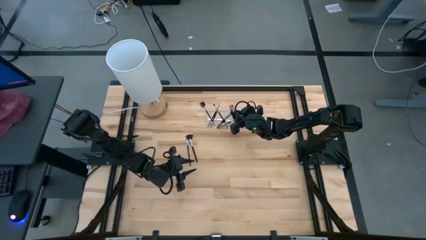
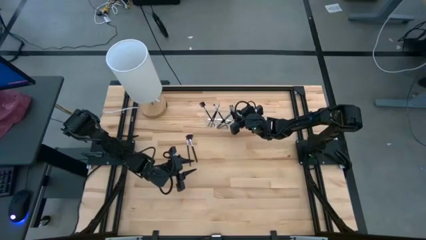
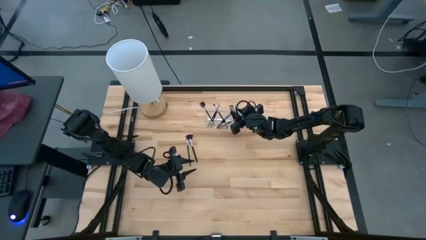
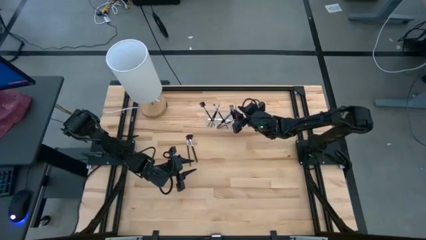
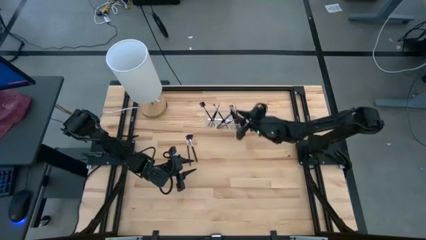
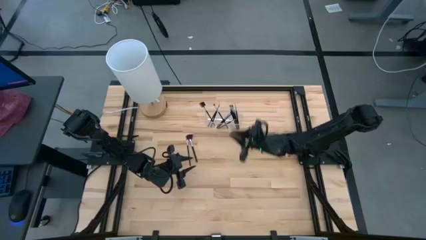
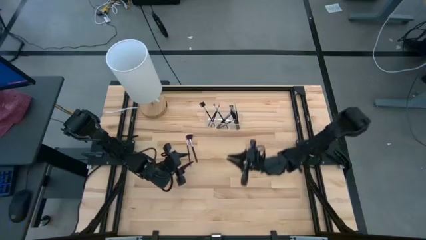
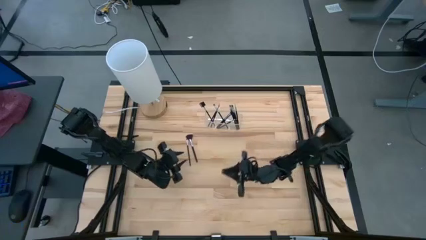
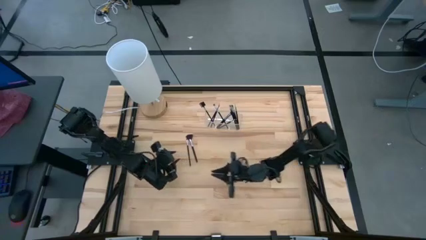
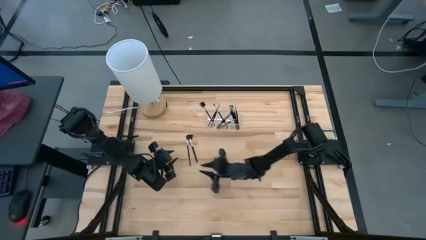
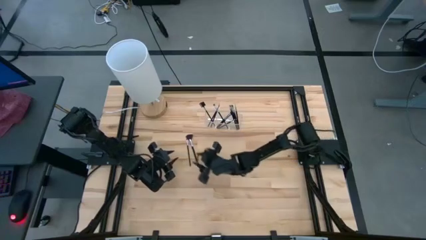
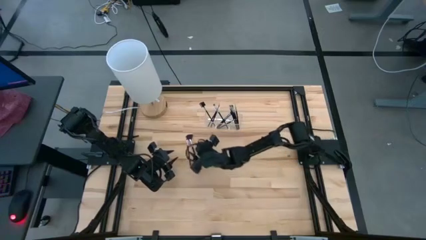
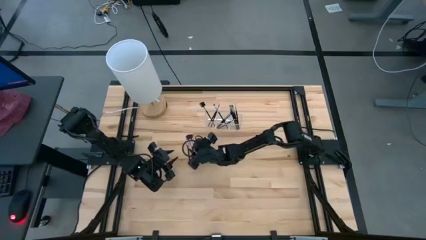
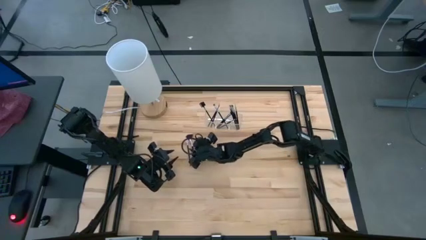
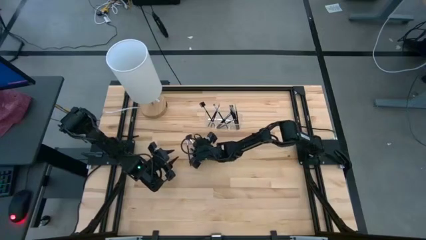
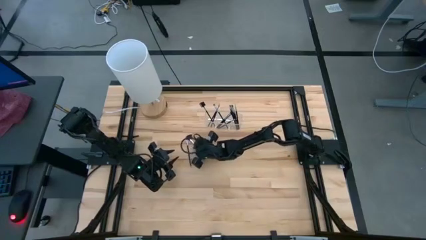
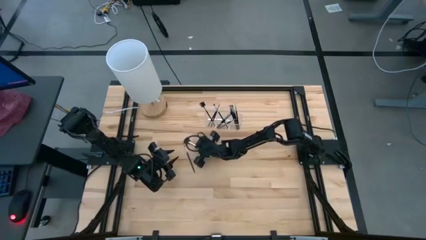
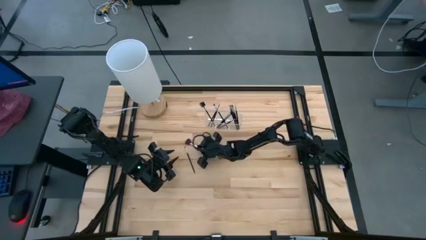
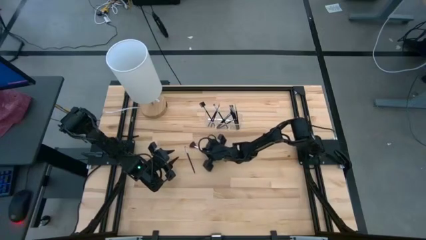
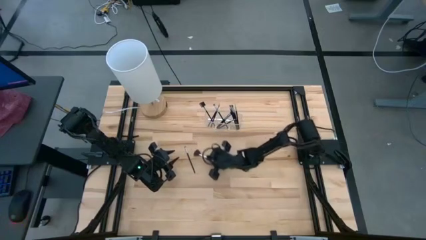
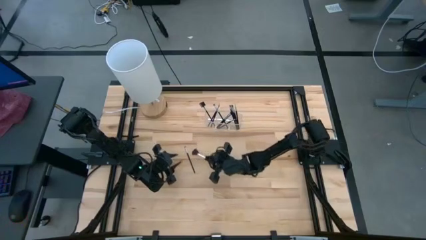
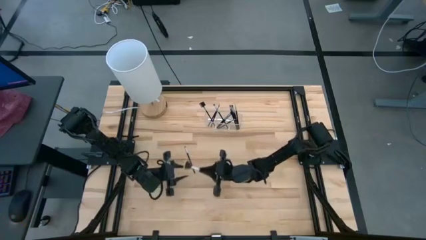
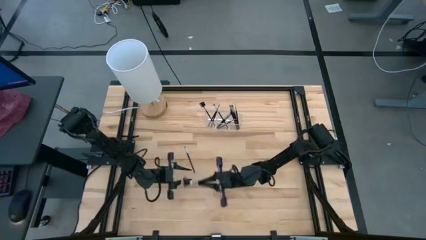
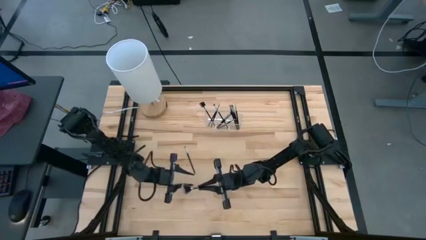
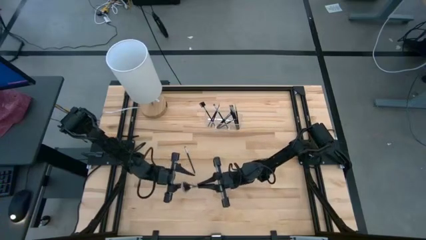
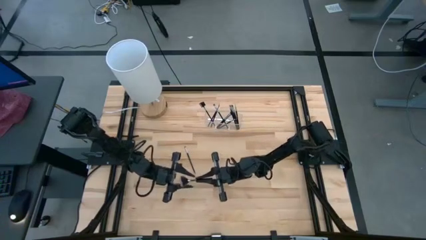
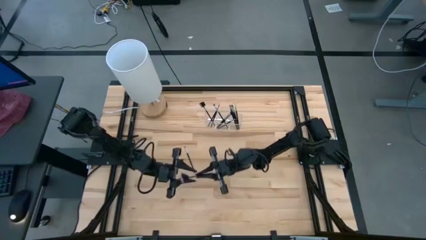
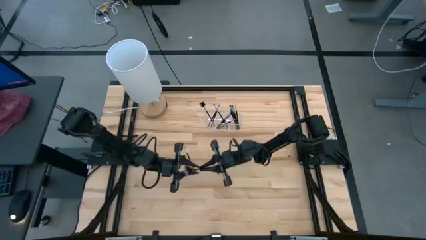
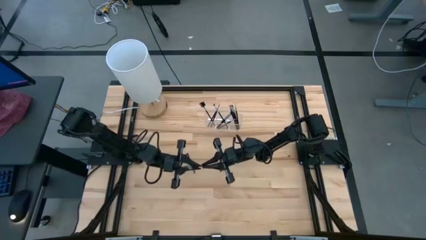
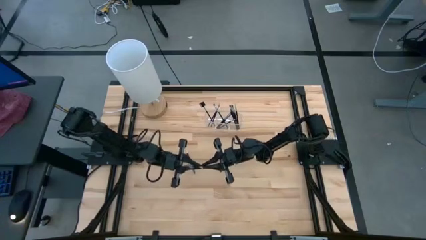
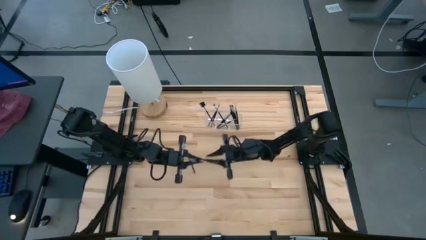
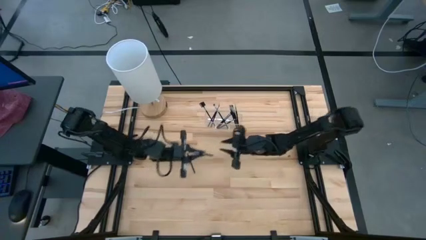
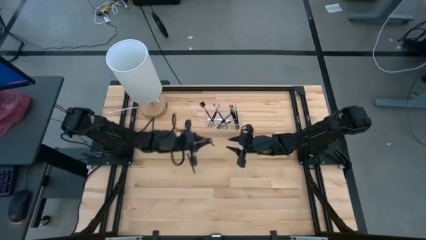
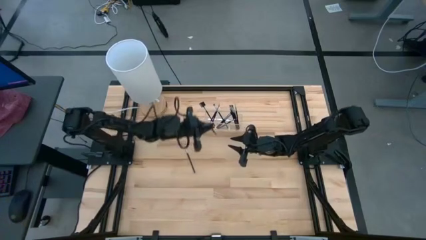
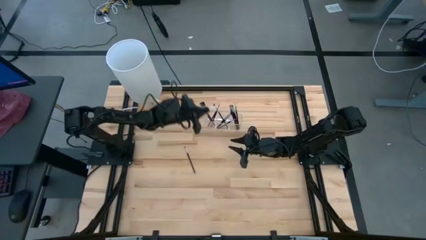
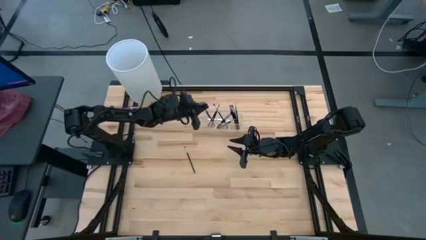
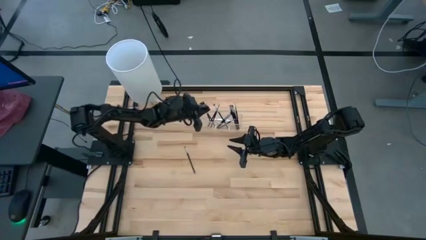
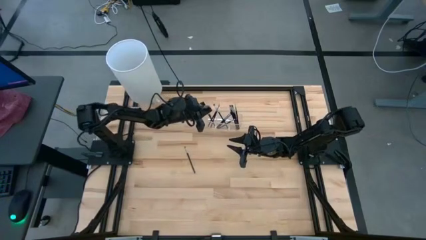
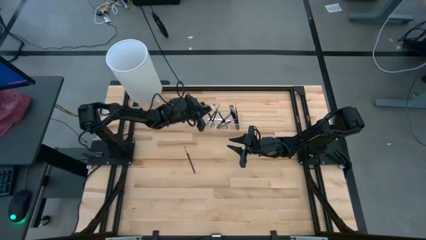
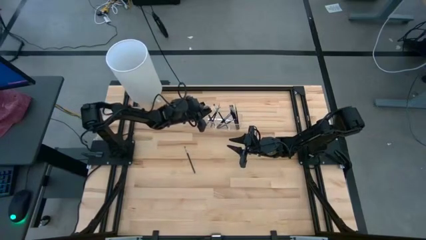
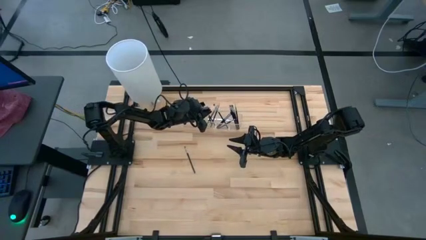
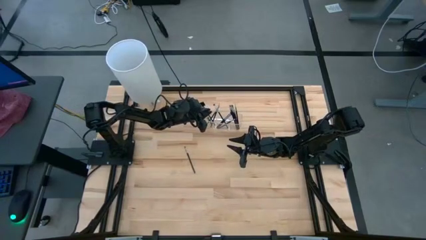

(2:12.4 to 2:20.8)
Task: Put items in baskets/containers
Put the black highlighter brush into the transparent organizer

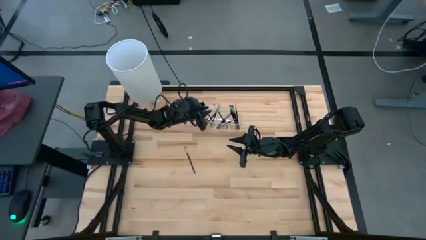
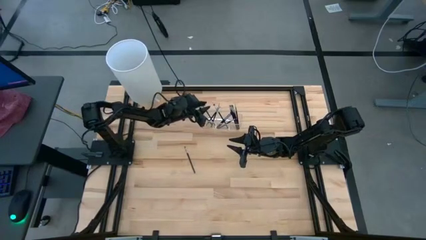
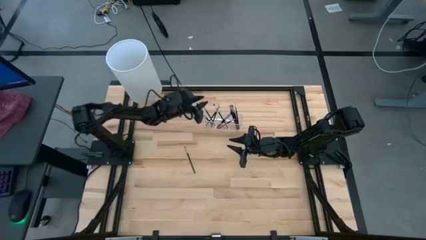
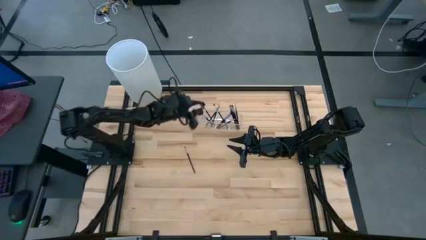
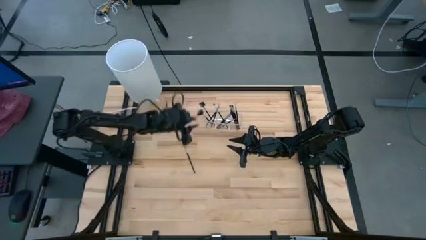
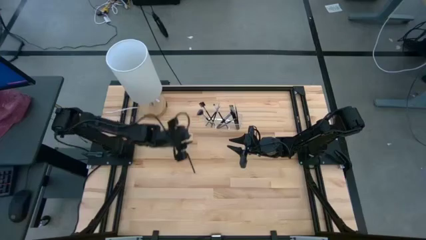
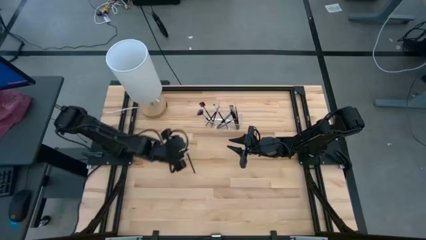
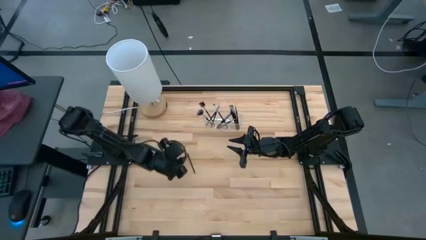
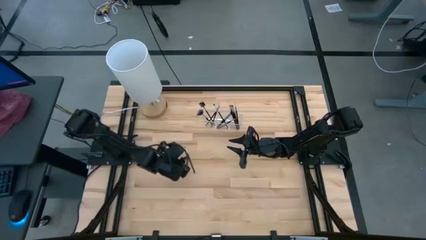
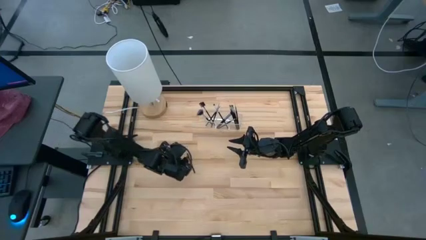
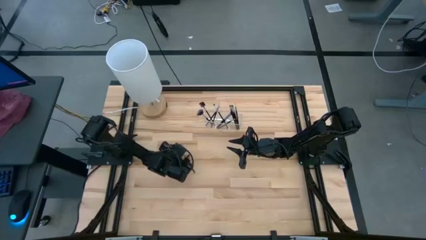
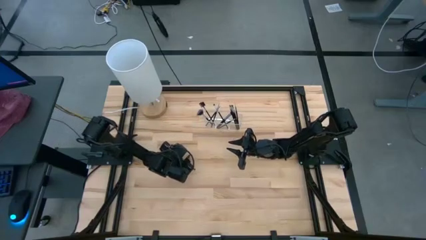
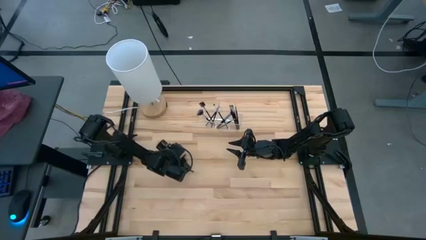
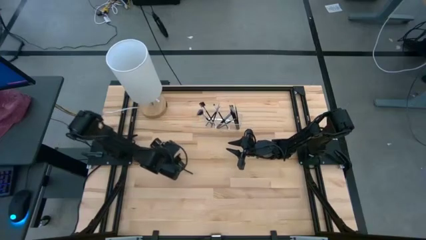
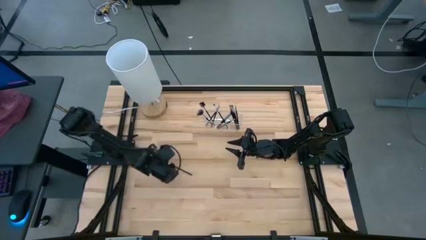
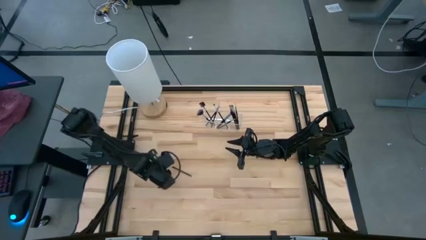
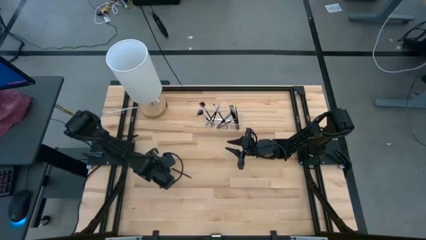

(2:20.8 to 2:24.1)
Put the black liner brush into the transparent organizer

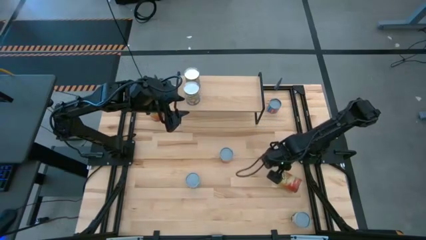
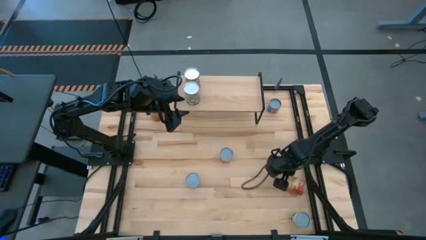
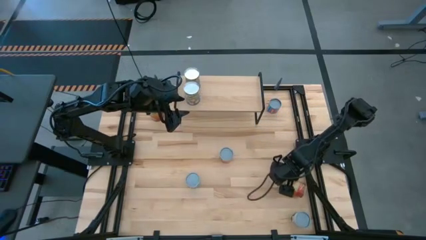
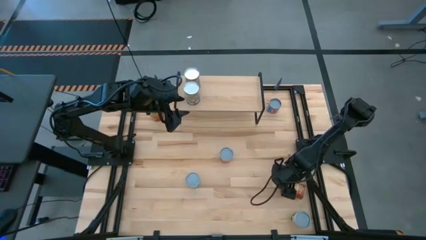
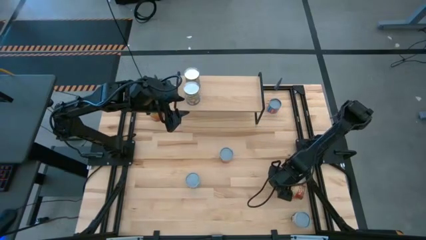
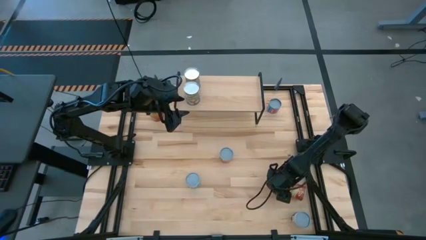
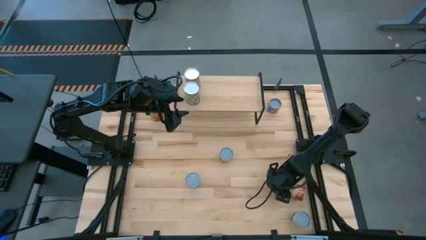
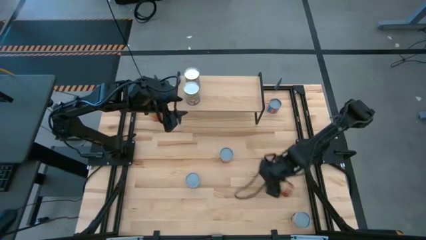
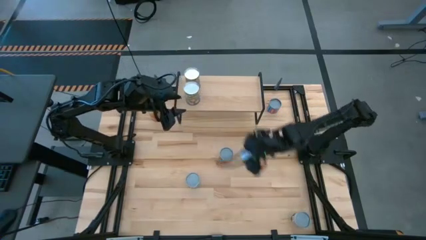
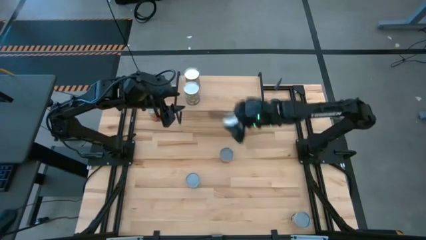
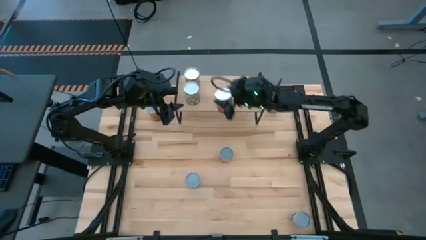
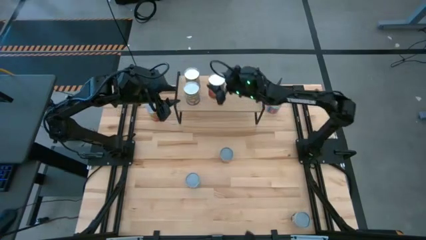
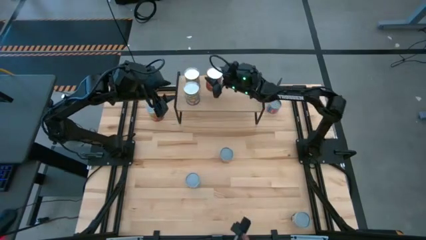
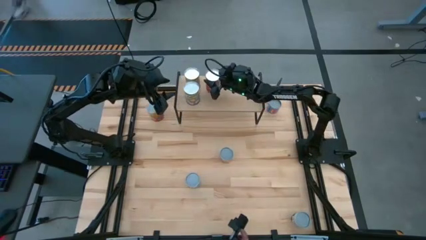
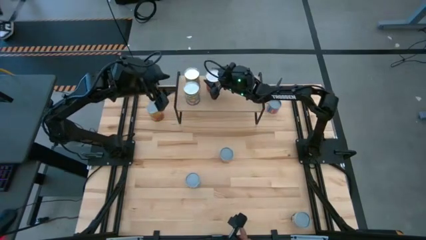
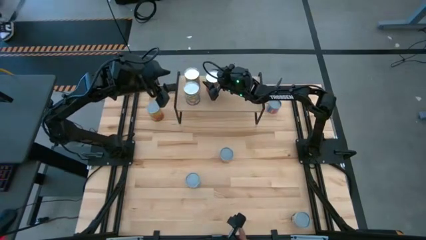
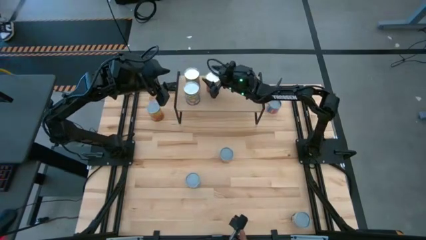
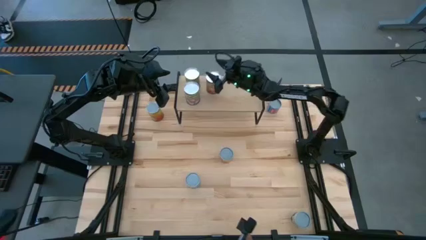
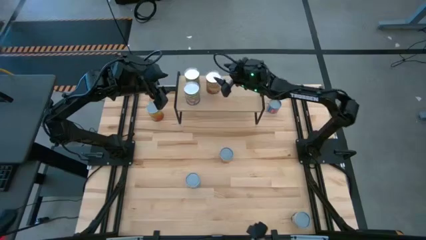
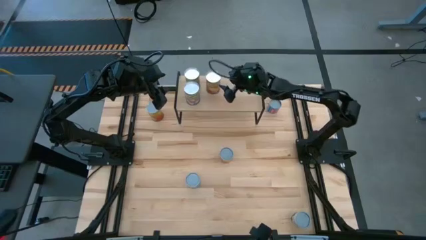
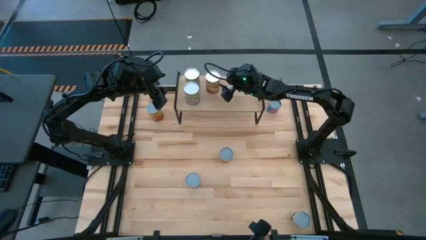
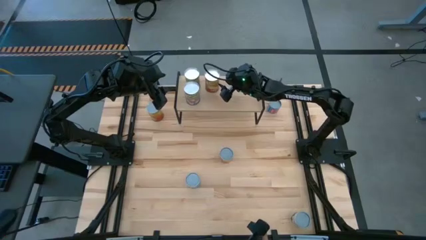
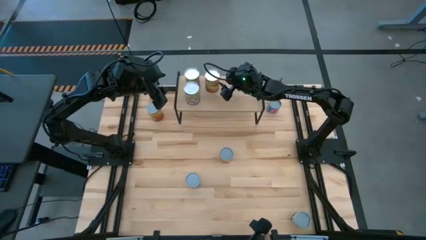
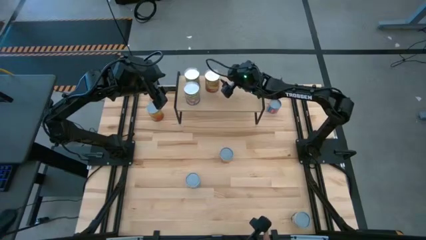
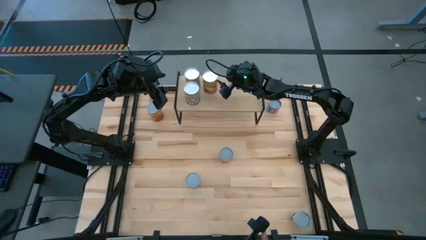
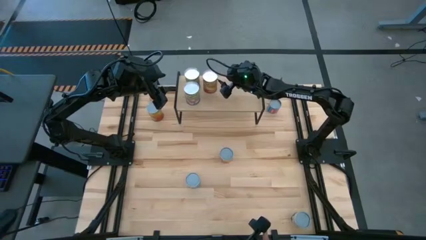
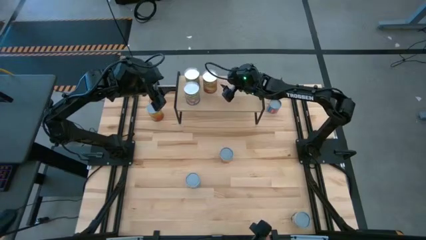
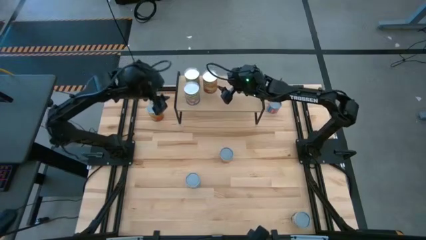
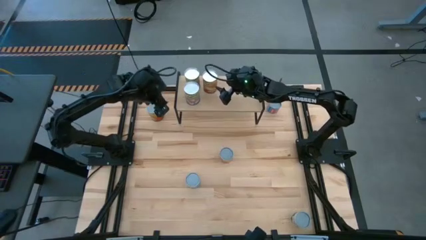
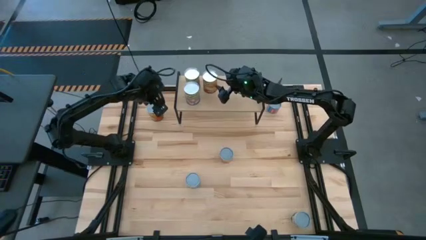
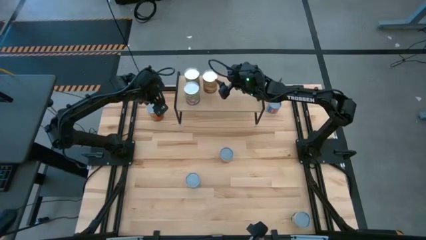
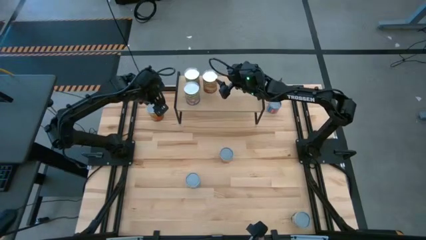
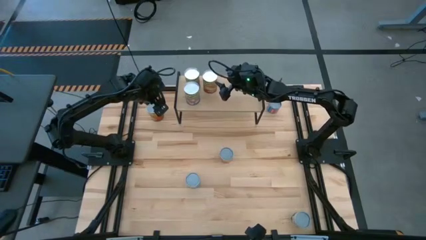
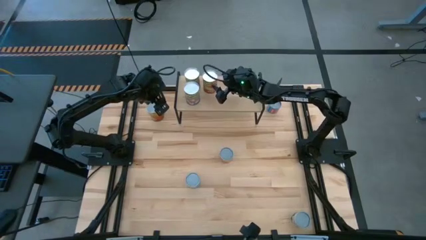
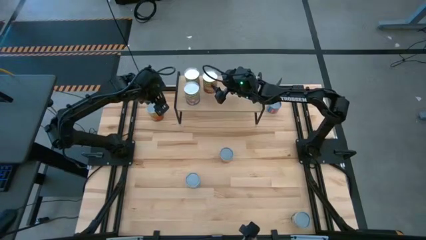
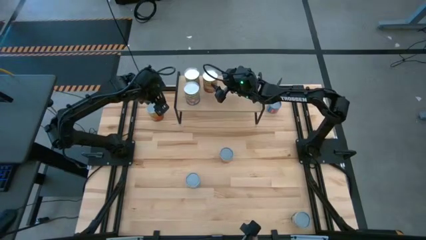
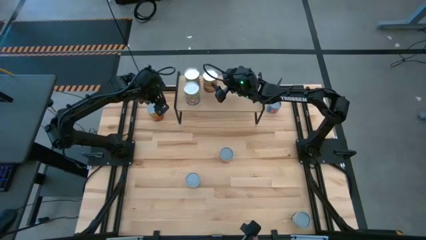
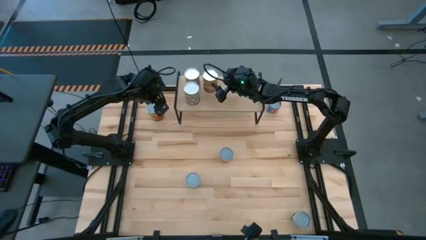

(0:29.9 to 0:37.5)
Task: Pick and place cans onto a shelf
Put the bottom canned corn on the shelf
